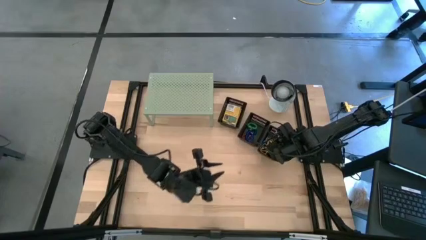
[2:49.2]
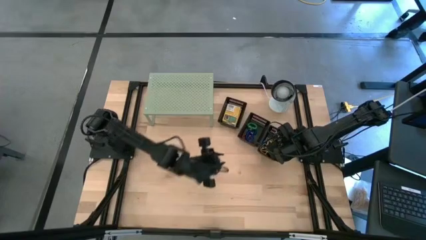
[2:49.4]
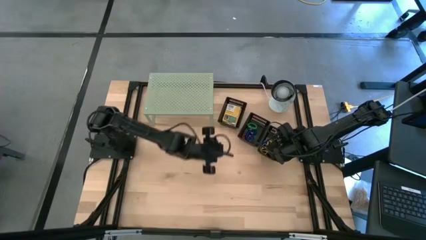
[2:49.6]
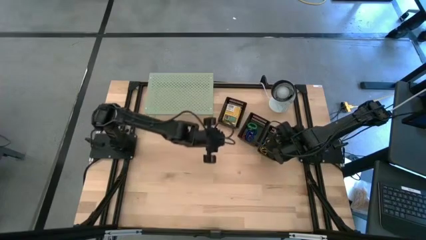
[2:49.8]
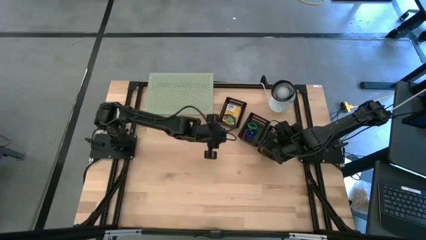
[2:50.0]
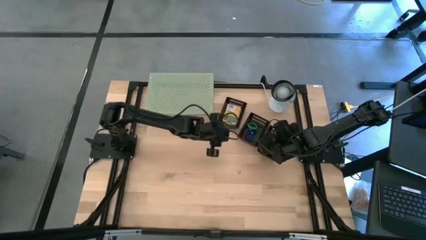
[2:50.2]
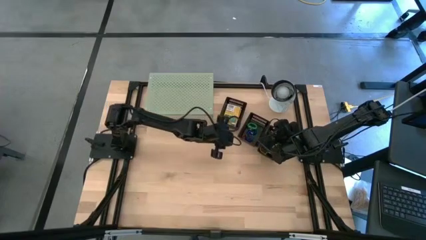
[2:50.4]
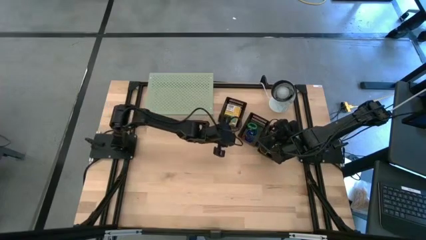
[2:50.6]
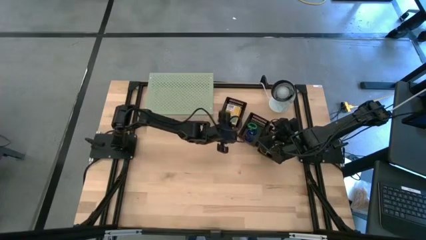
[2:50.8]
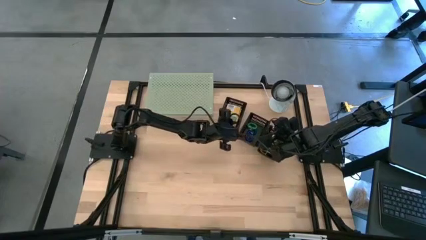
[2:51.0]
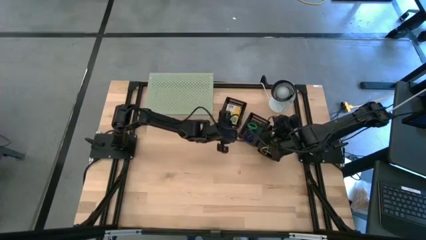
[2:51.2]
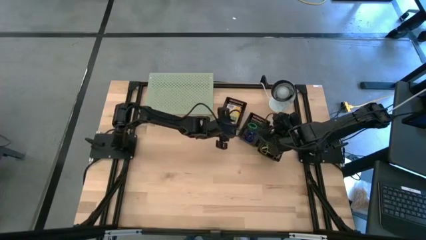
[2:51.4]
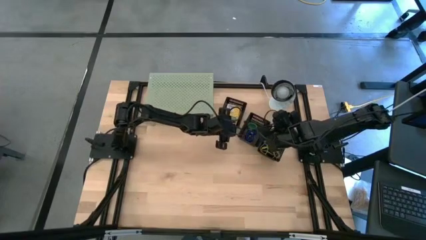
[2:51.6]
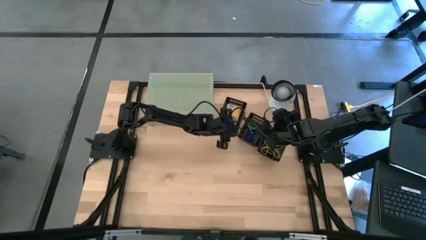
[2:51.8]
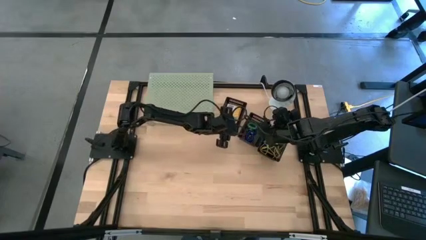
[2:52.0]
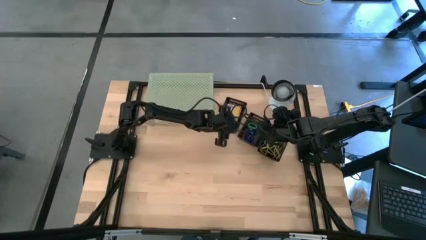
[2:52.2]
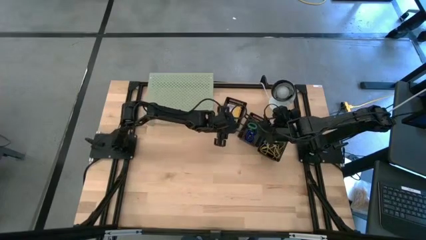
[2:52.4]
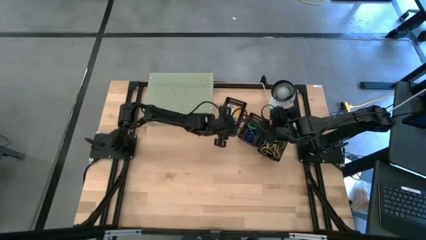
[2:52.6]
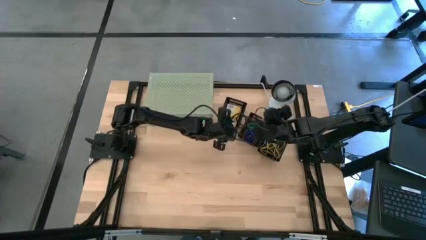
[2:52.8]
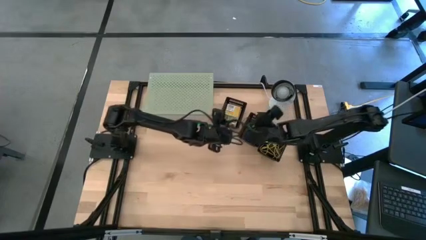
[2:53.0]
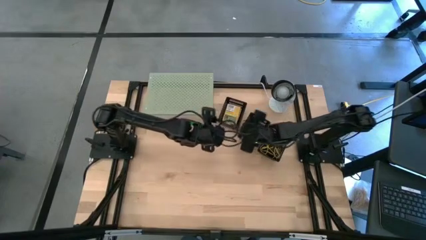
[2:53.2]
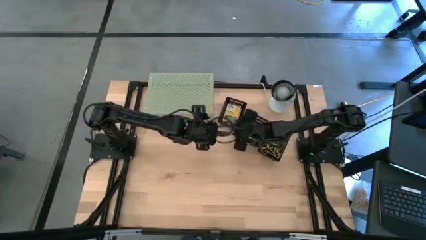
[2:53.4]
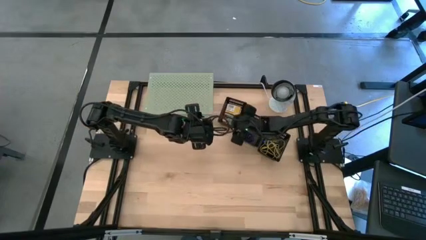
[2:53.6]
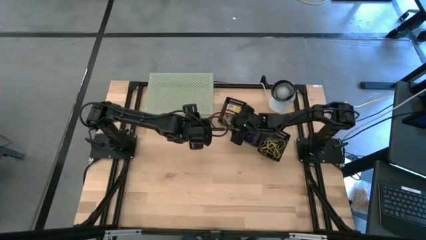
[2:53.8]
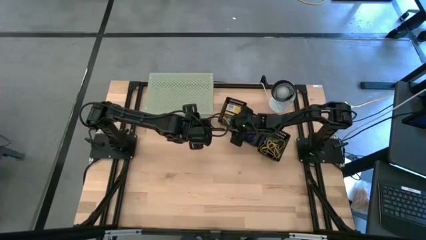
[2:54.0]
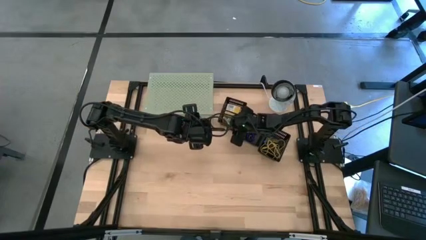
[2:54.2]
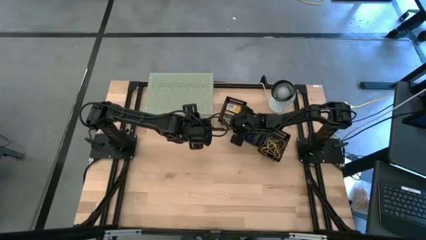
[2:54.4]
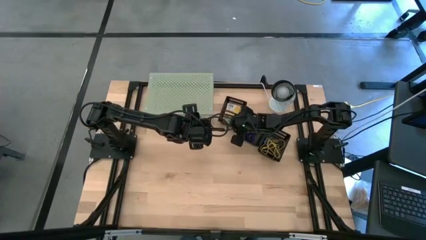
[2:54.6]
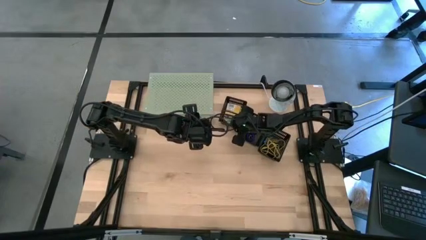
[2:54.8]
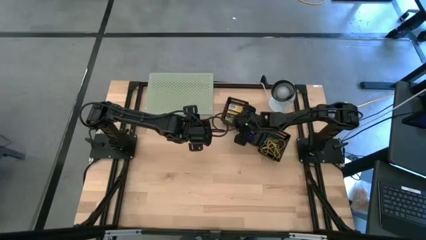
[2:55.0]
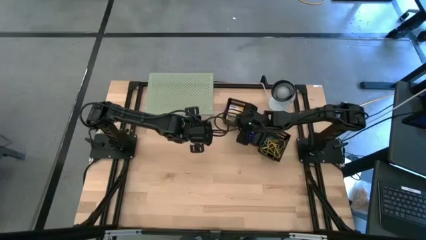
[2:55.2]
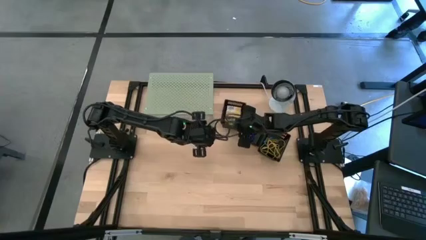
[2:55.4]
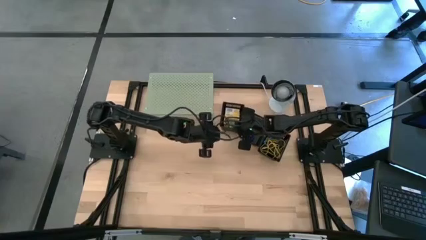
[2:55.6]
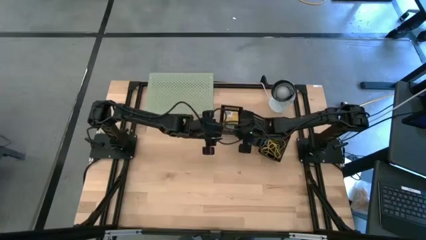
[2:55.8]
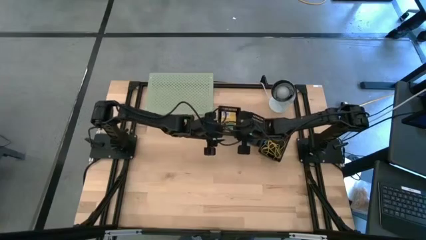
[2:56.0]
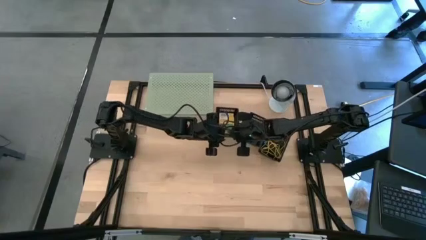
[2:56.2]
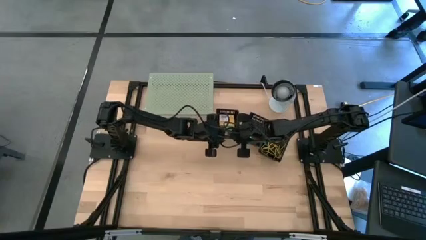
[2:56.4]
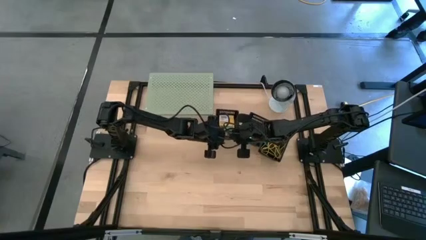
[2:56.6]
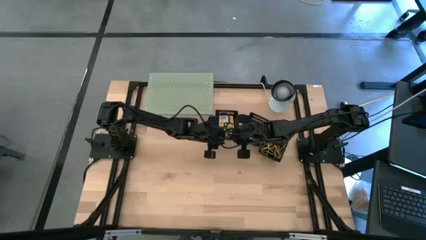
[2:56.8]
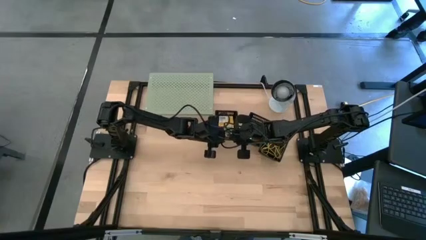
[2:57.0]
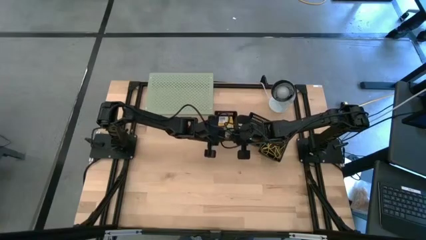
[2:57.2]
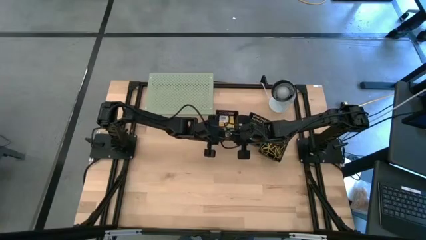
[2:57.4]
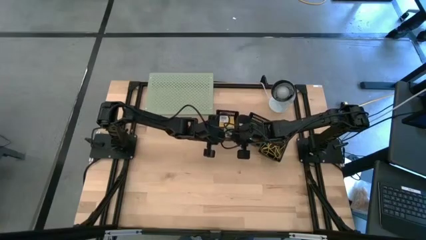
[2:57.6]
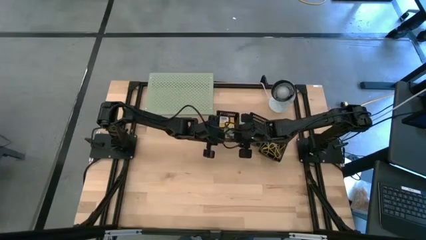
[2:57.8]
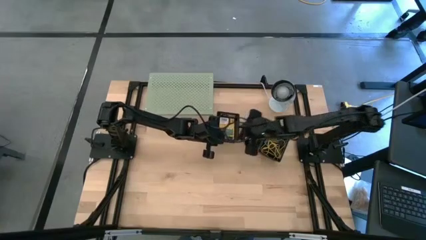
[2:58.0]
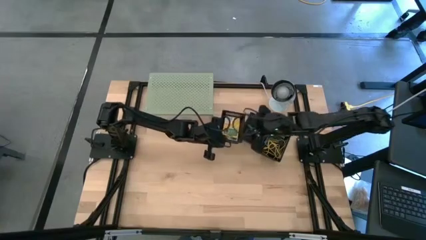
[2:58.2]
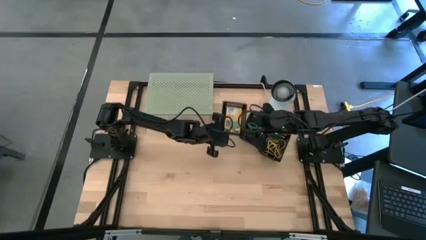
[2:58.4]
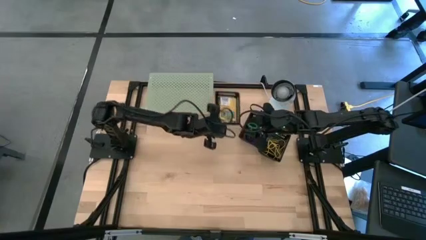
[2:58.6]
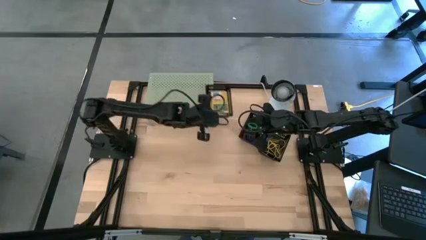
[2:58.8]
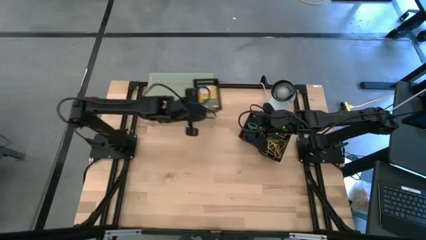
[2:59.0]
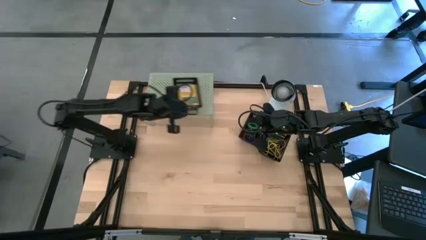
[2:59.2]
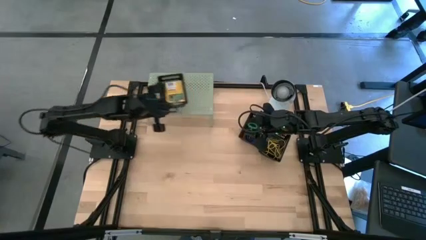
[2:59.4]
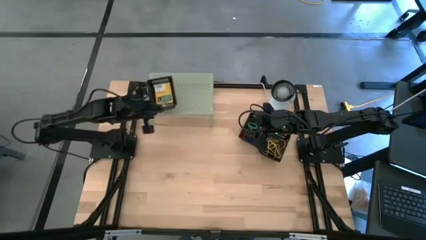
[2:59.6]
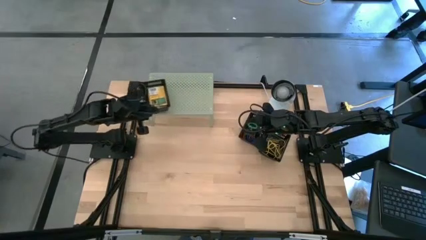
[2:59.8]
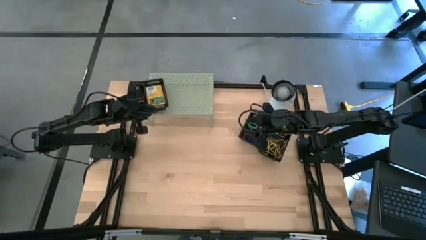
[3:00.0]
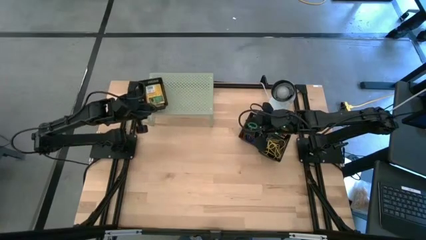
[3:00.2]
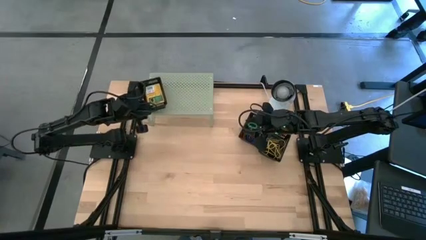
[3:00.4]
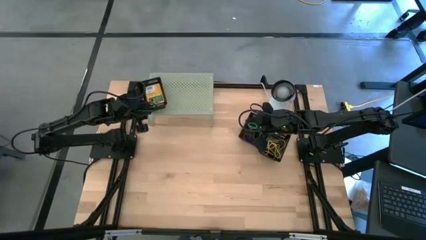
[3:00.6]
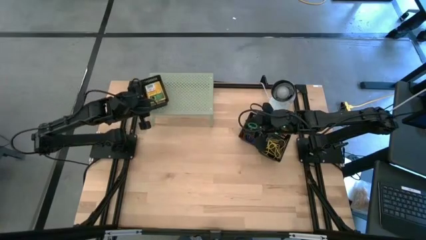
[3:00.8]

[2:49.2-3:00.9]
Task: Pick & Place Office Desk Supplies
Put the top black bin on the shelf

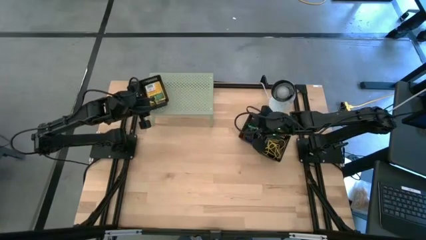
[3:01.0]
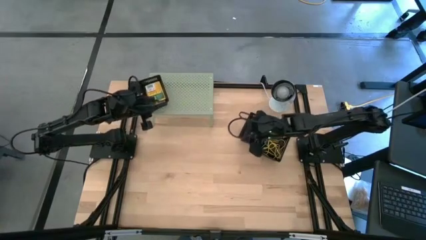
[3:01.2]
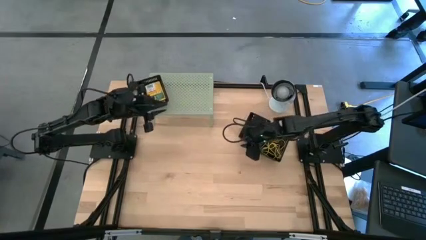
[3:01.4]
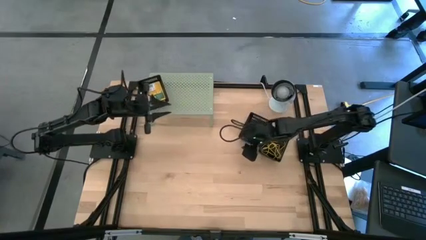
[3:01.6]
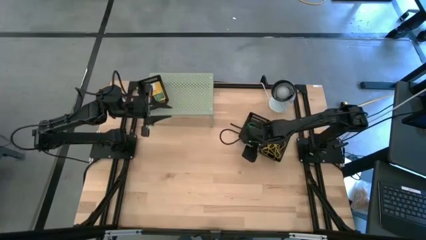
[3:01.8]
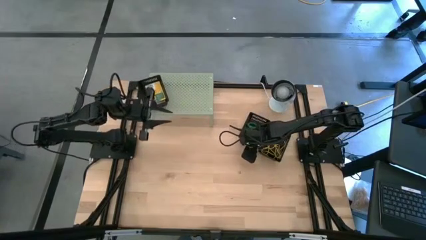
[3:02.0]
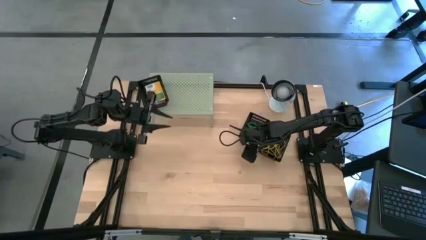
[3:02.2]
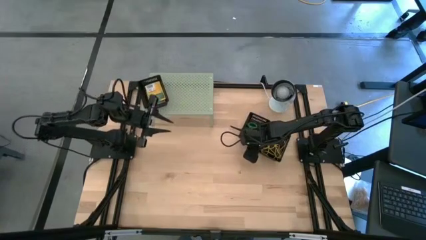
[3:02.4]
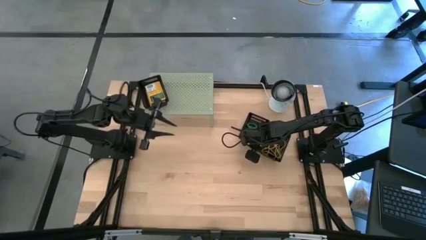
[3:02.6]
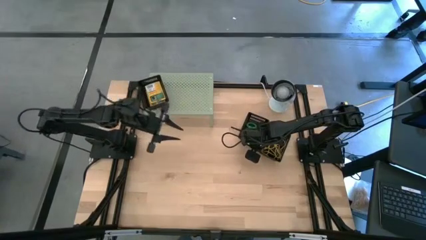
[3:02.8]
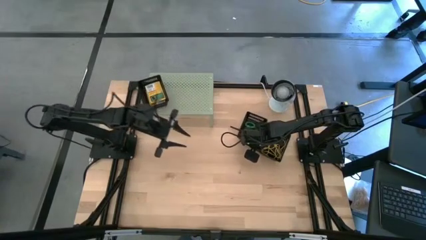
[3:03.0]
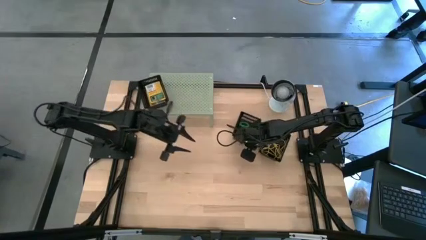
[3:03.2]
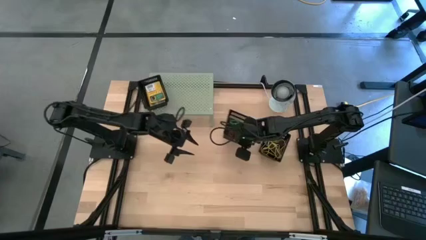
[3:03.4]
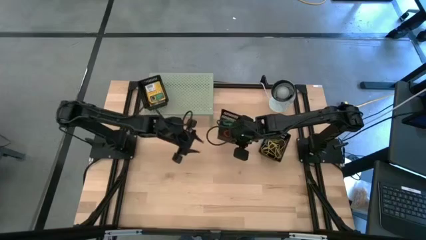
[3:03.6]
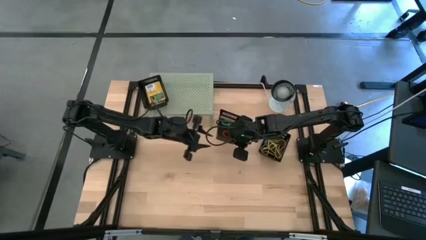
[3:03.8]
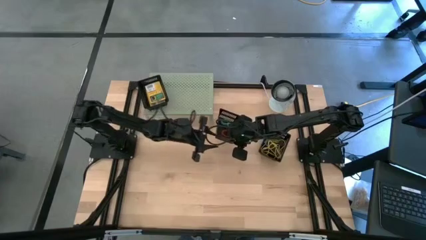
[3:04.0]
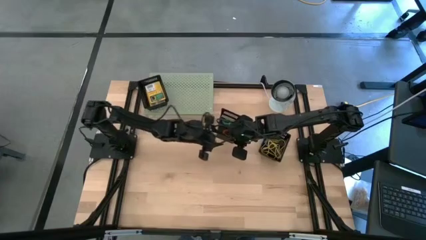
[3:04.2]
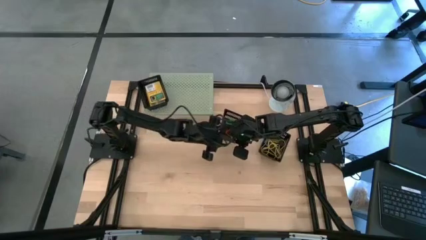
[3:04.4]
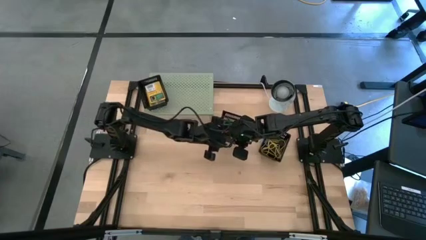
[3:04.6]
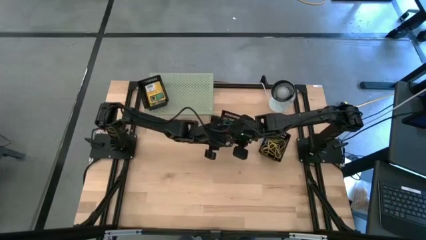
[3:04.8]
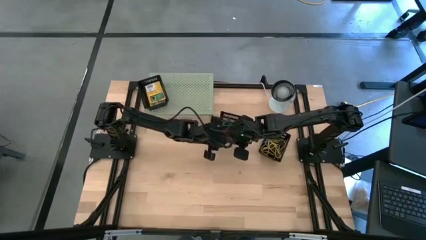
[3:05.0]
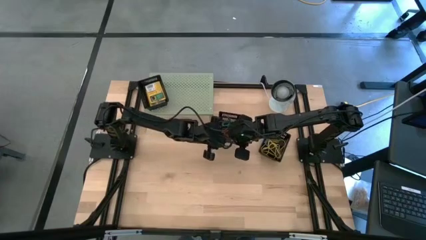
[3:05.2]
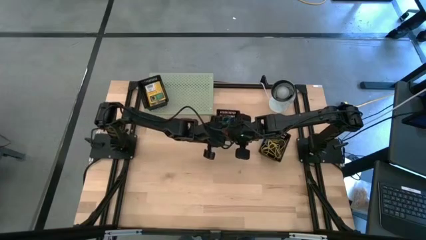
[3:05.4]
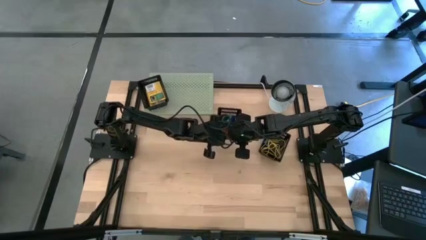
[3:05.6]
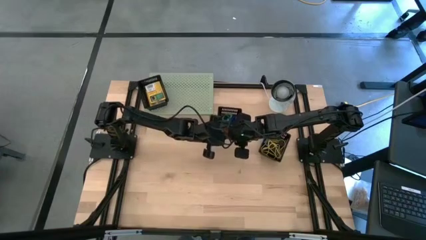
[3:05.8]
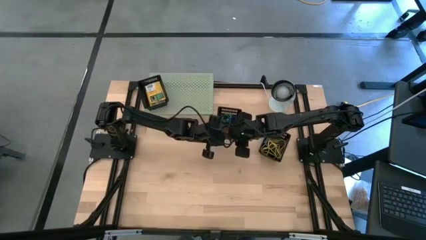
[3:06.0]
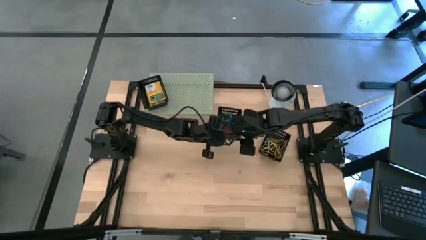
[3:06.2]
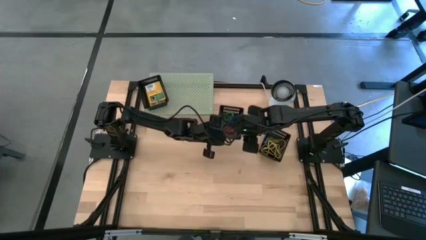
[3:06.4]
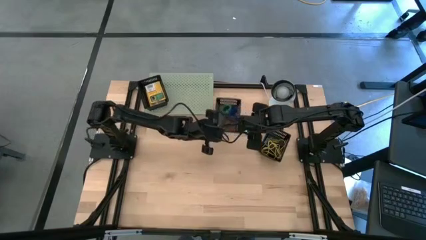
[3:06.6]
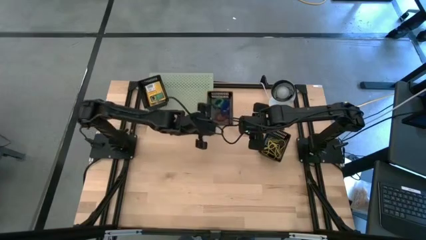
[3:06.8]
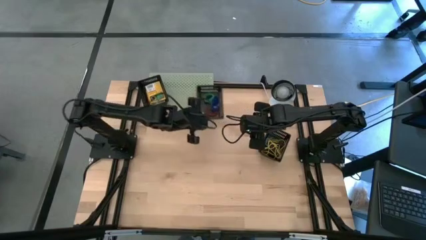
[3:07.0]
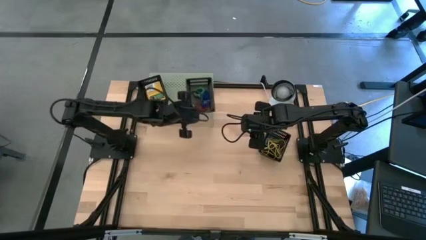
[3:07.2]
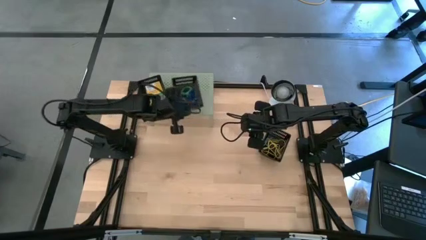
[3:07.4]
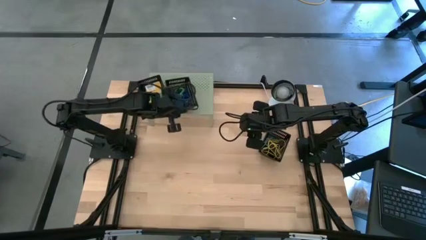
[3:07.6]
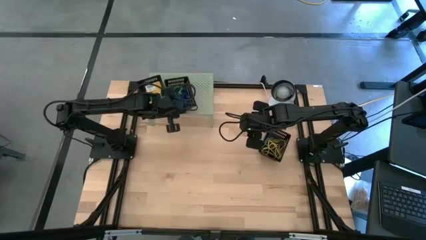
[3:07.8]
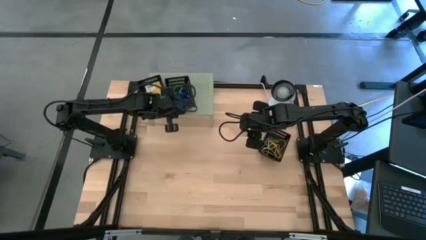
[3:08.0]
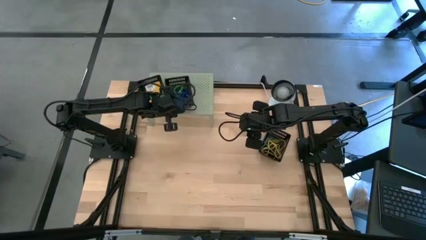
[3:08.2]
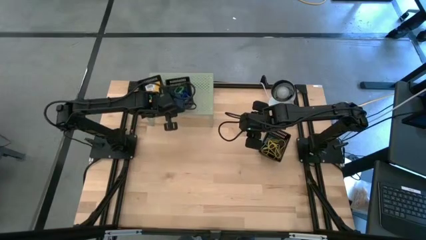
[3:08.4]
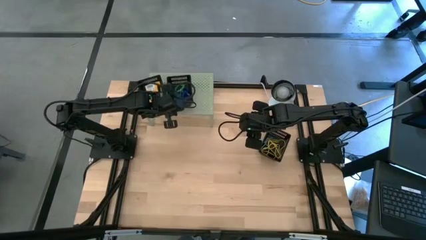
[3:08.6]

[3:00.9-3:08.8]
Put the top black bin on the shelf
